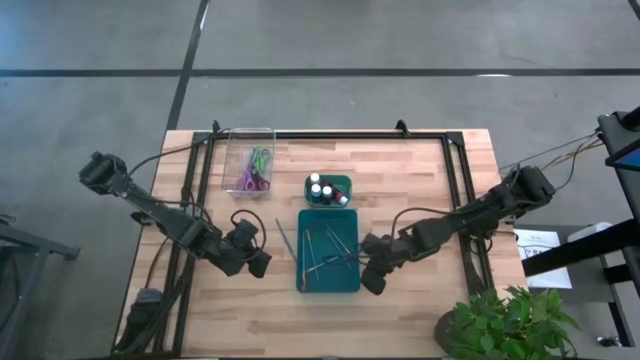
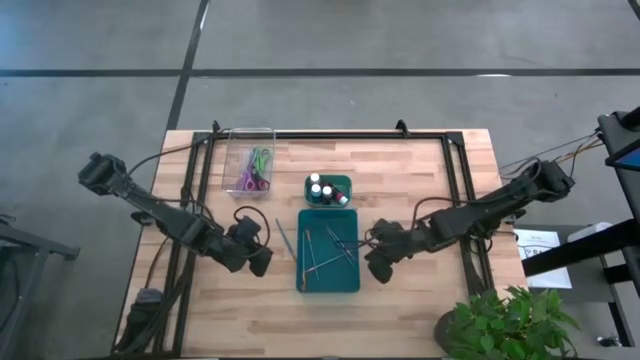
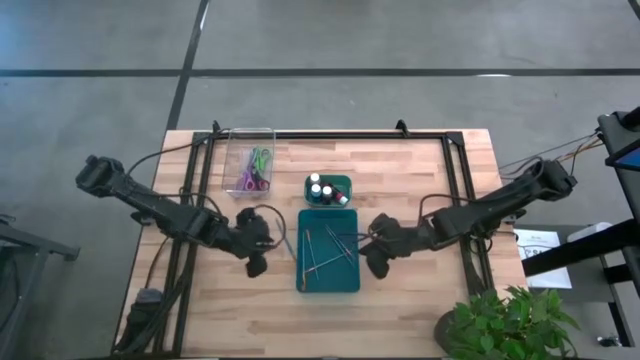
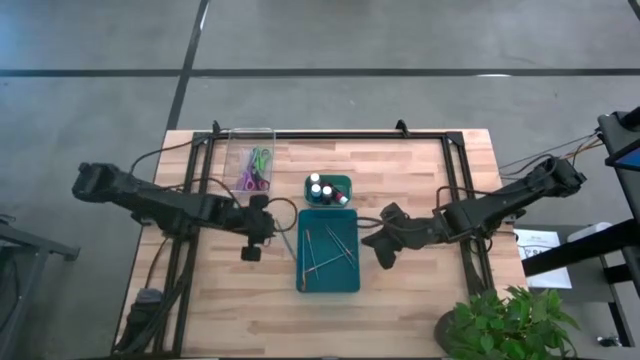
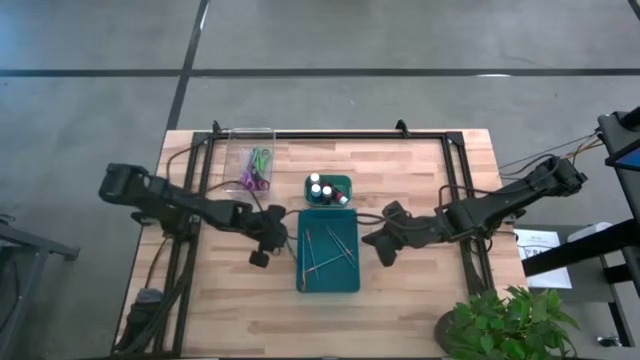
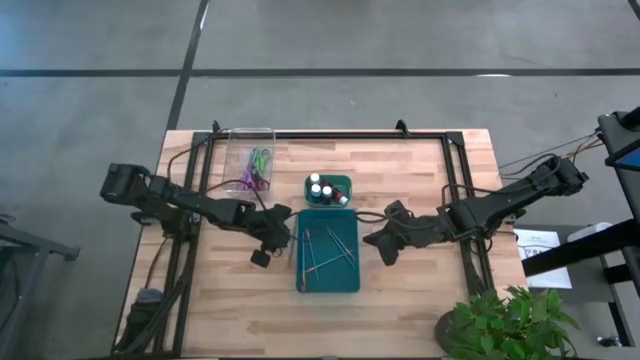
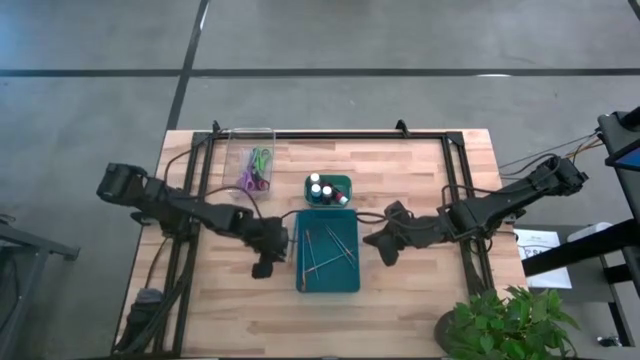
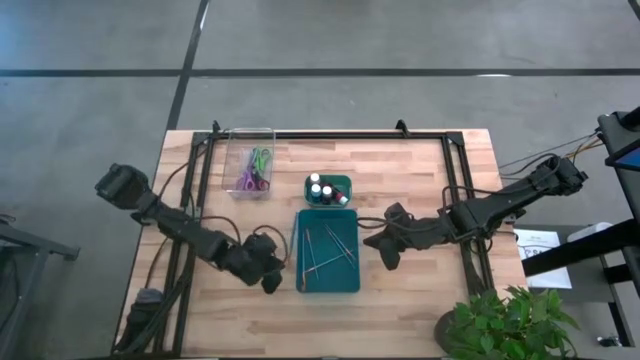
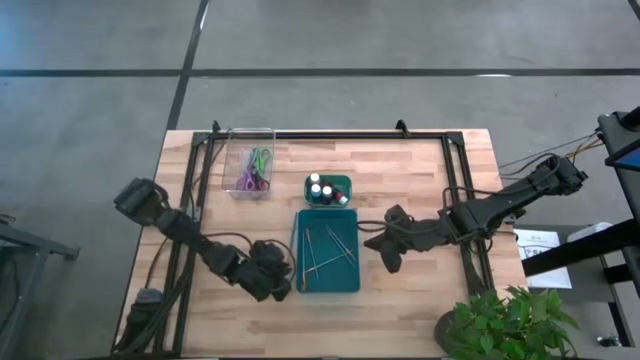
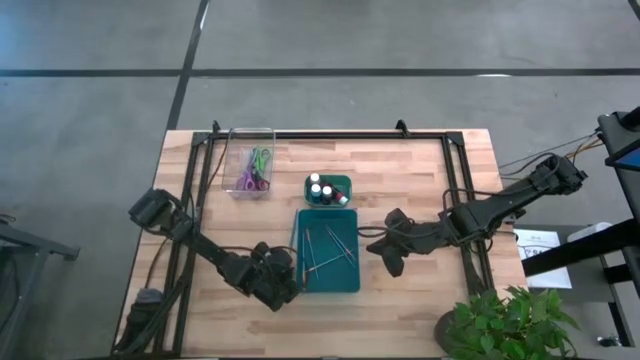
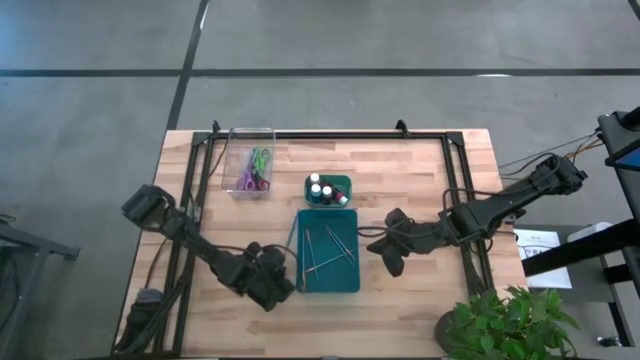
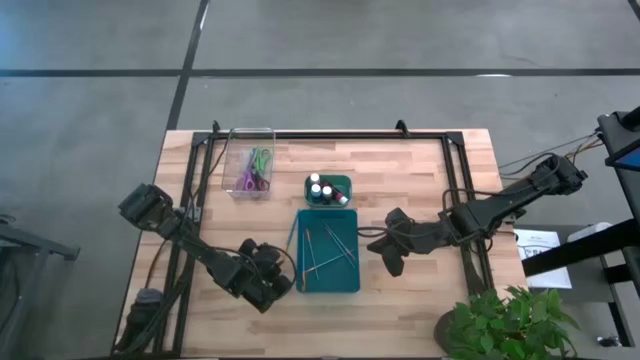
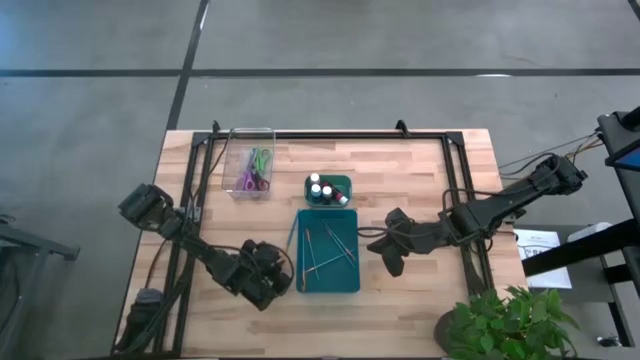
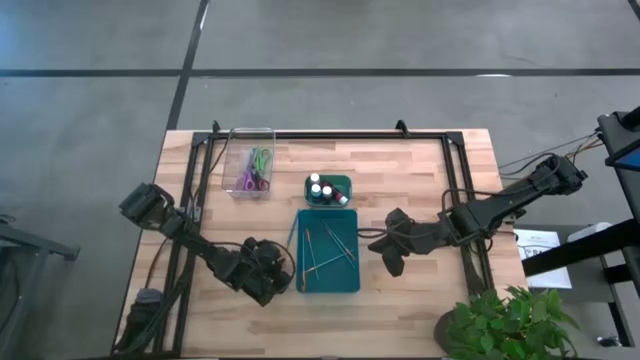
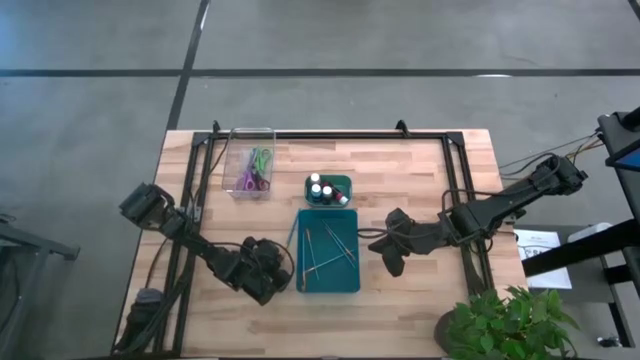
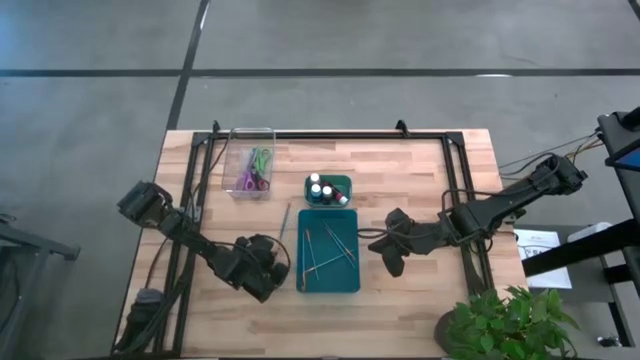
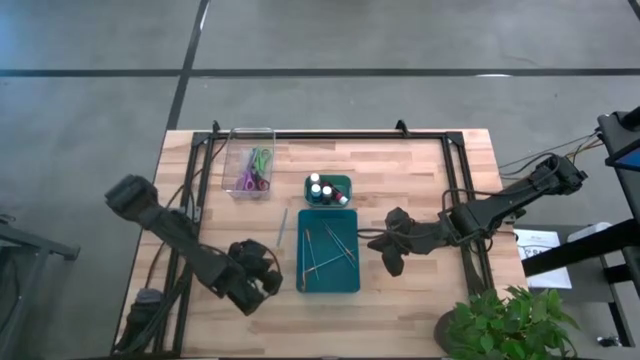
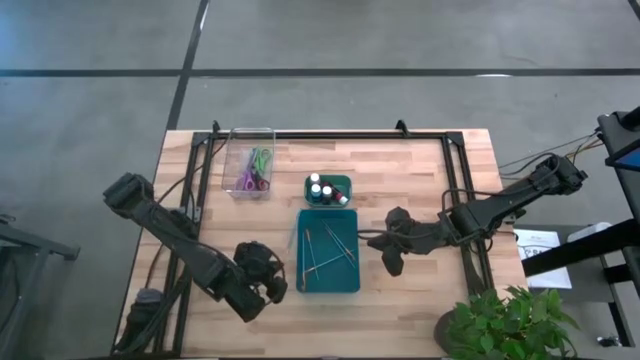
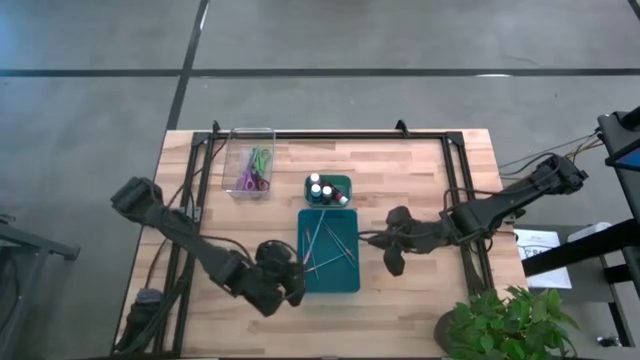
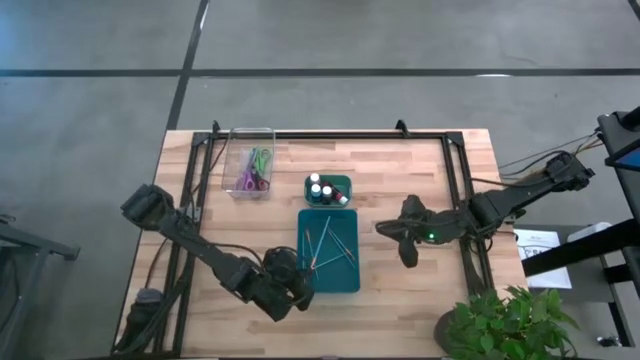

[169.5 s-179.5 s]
Task: Pick & Place Paint Supplies
Put the blue paintbrush into the blue bin

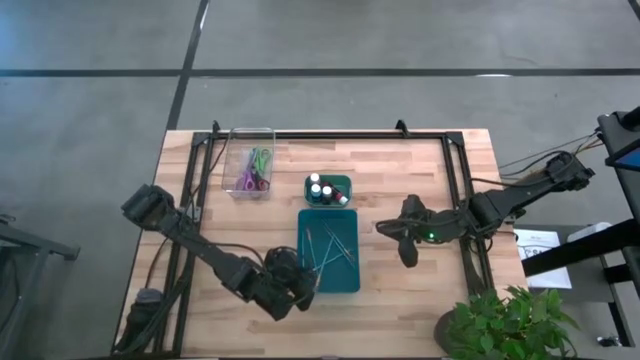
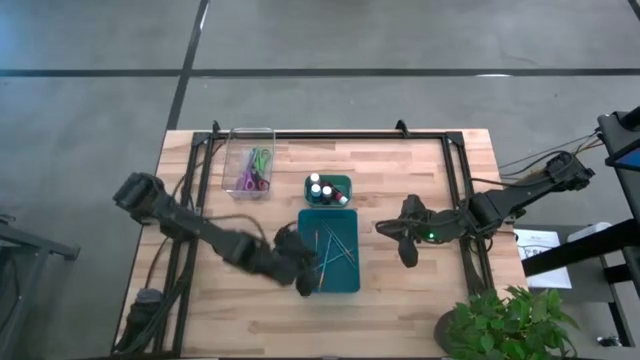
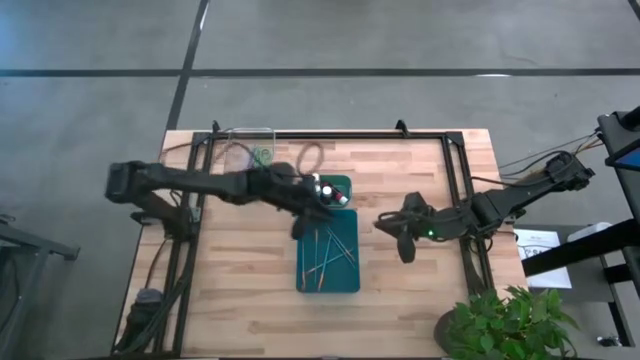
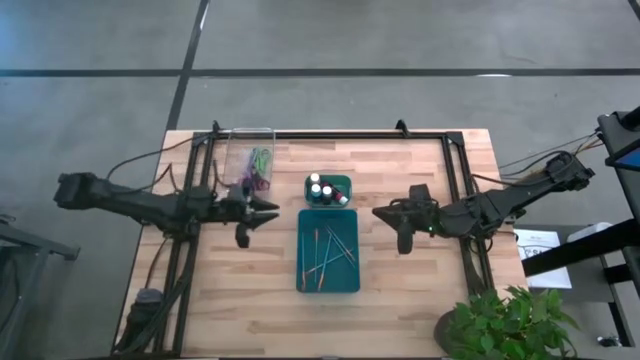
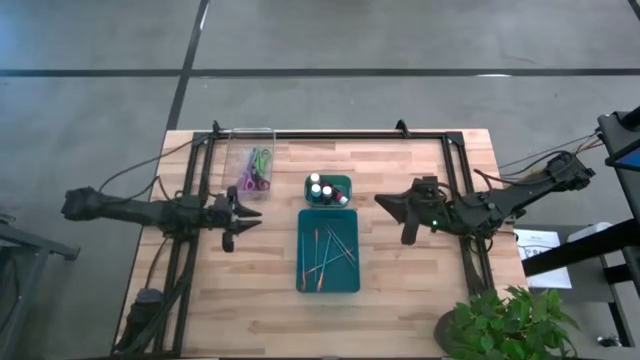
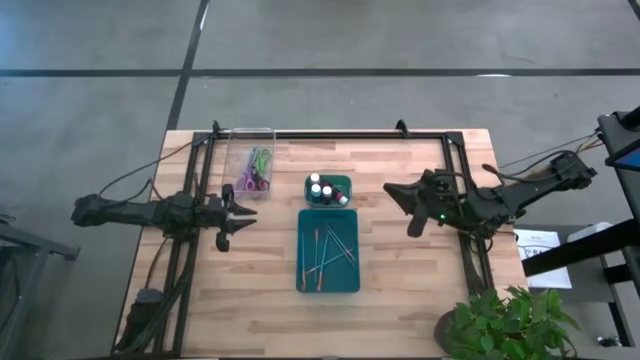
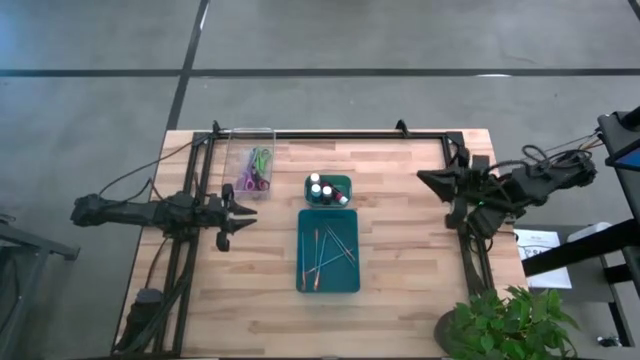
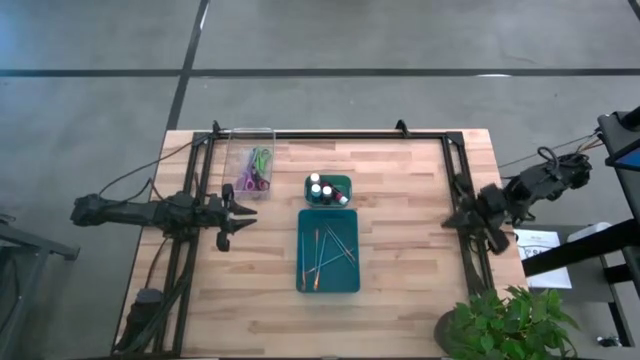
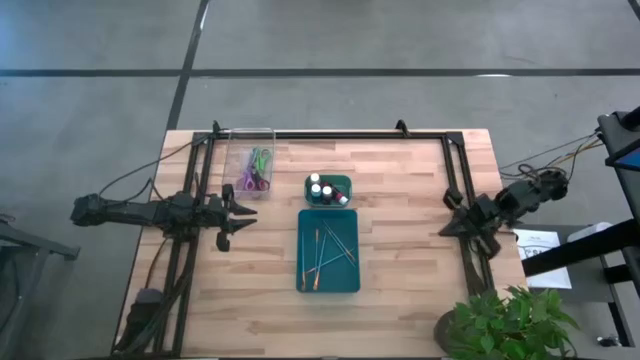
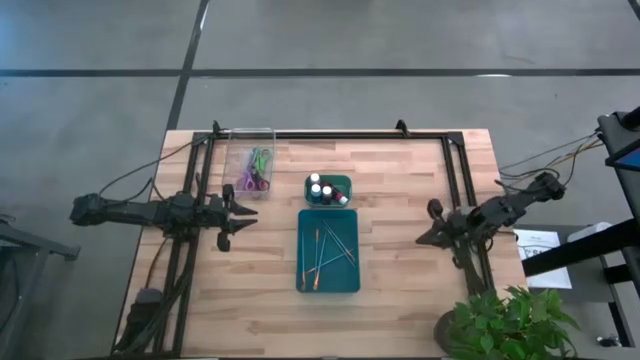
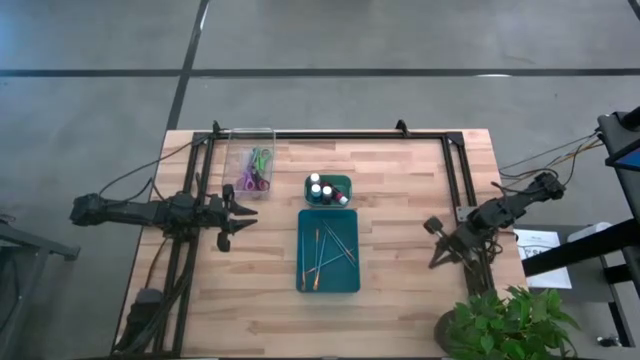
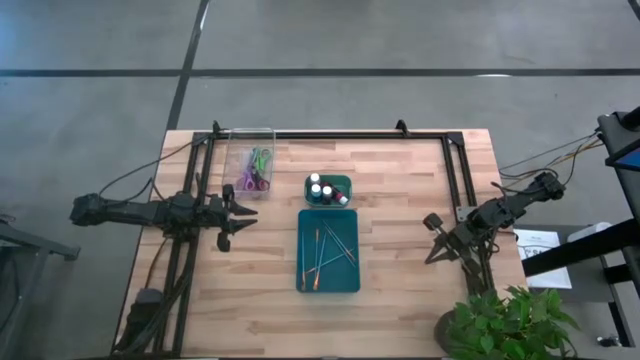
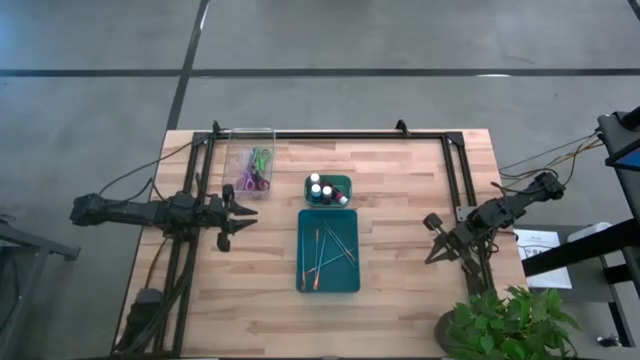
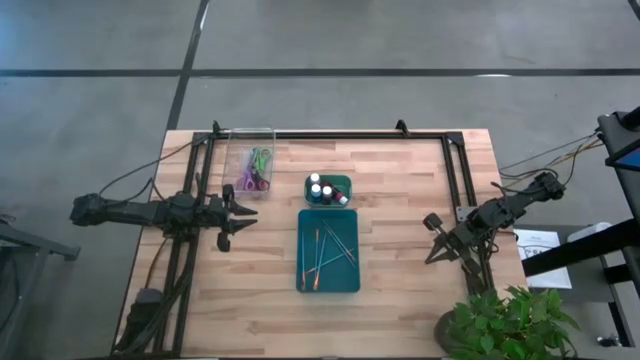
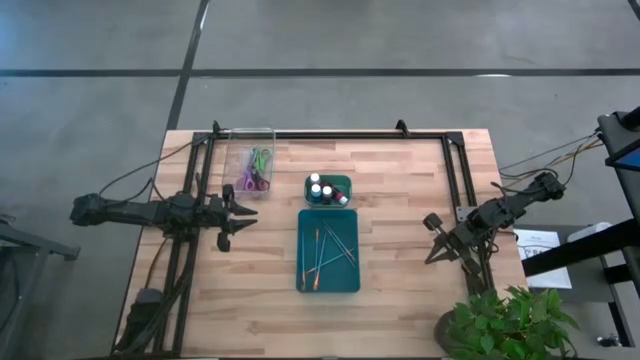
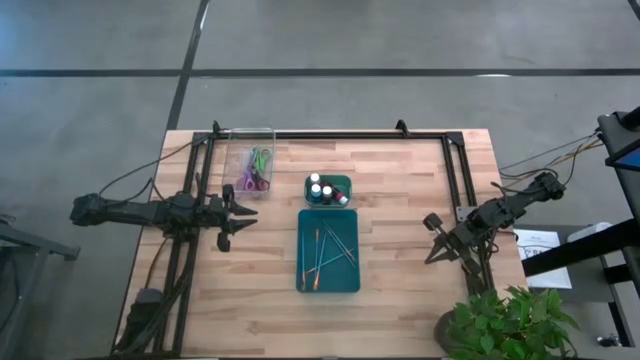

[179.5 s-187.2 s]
Return to Home Position

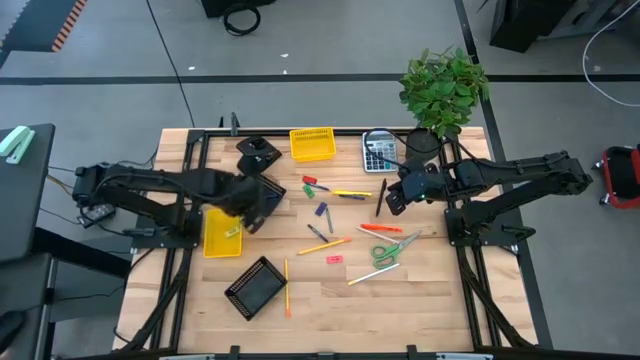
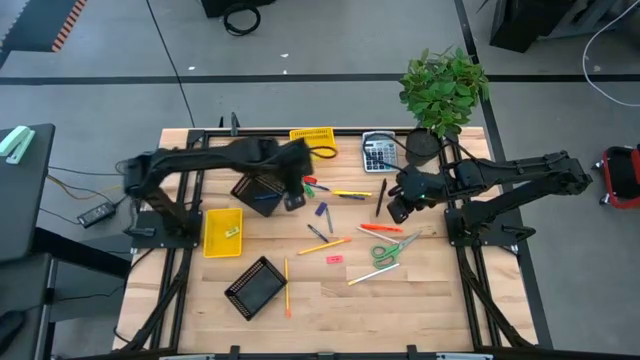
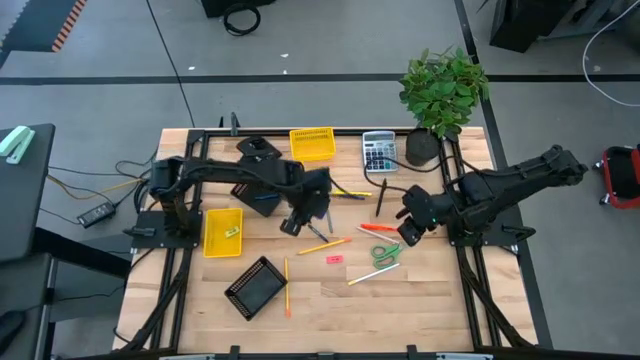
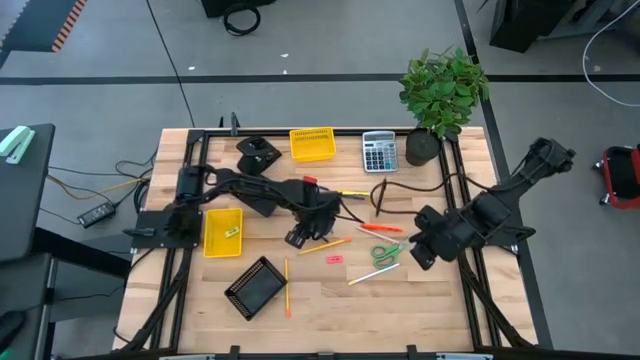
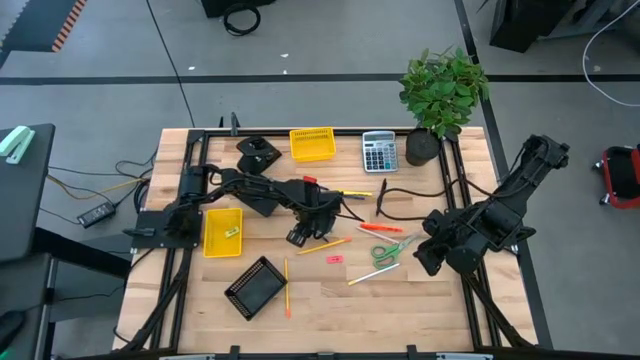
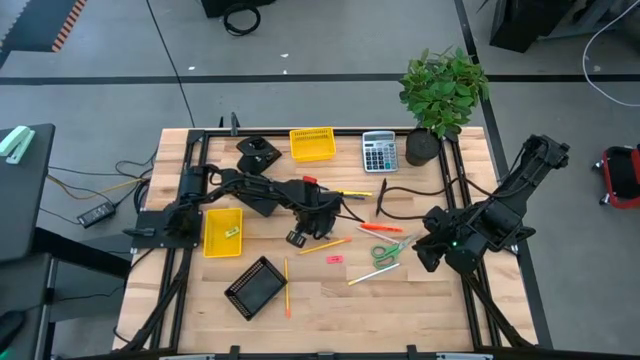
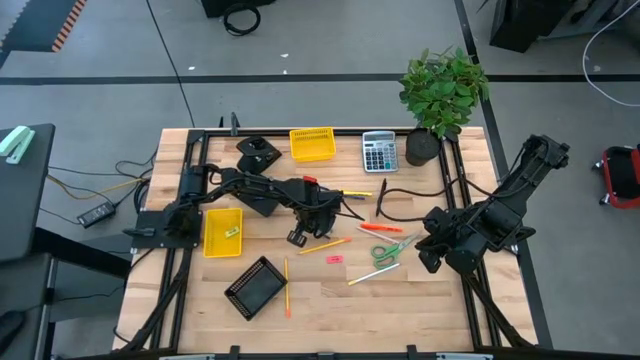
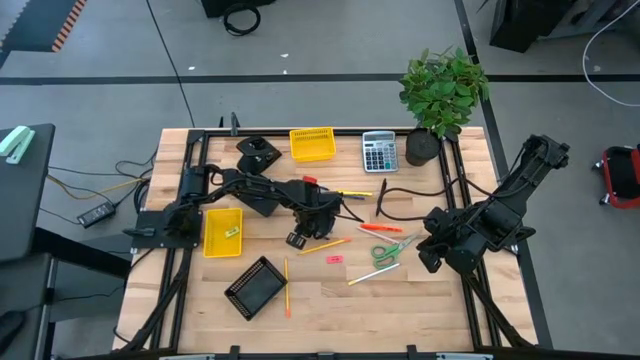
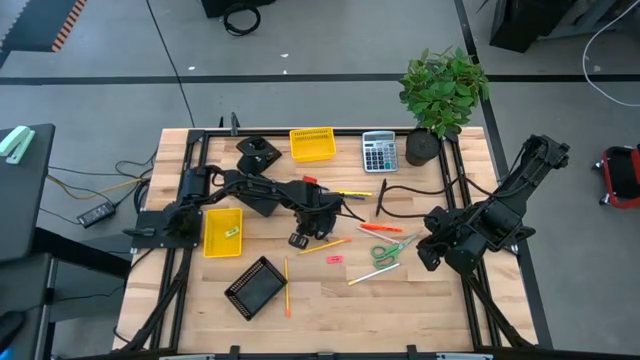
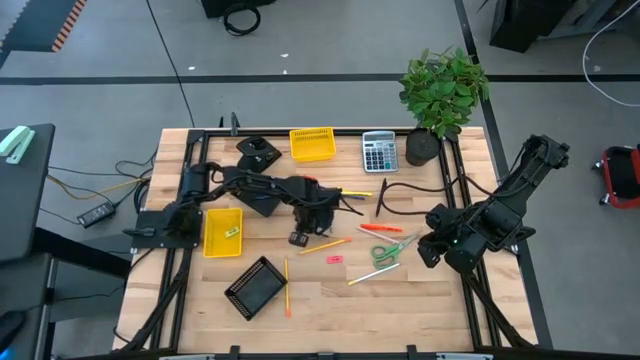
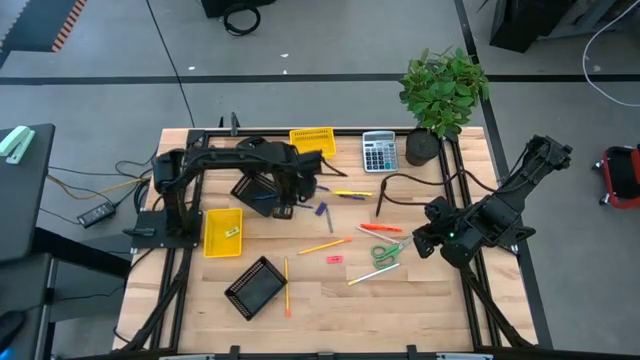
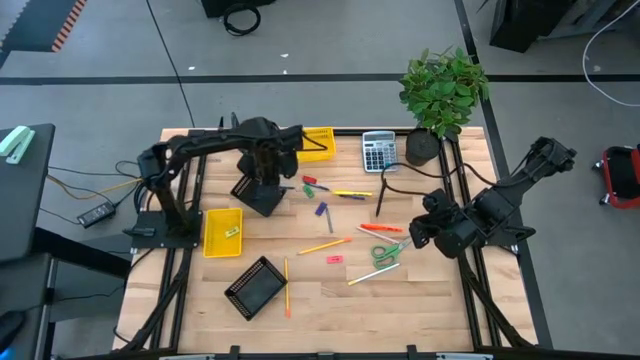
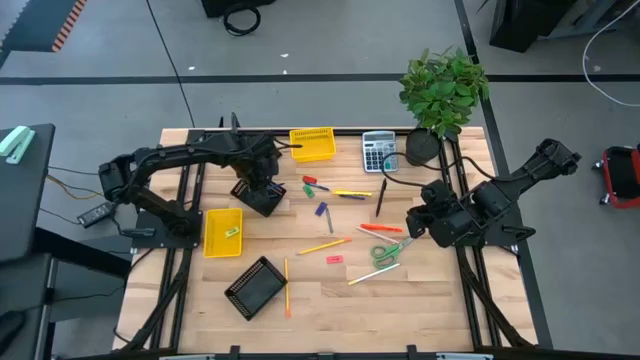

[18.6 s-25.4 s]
Task: Sort crayons/erasers/pens/pencils in bins
Put the blue crayon into the top black basket
